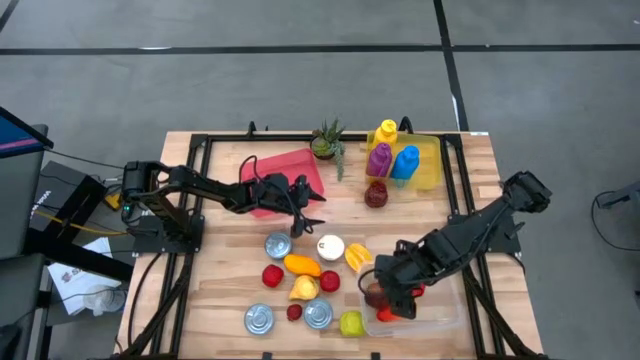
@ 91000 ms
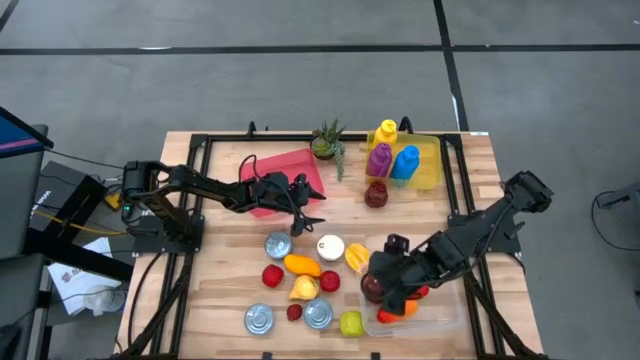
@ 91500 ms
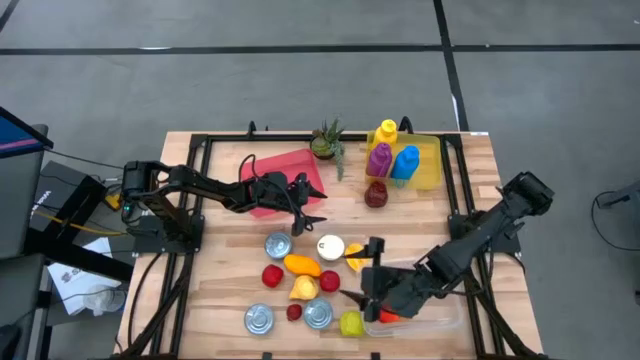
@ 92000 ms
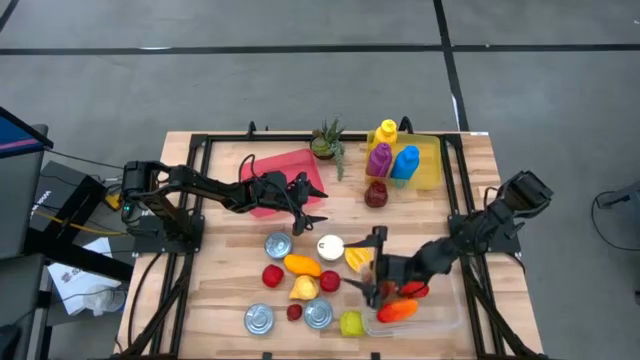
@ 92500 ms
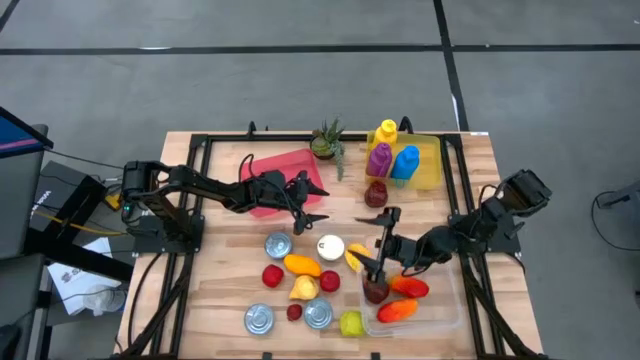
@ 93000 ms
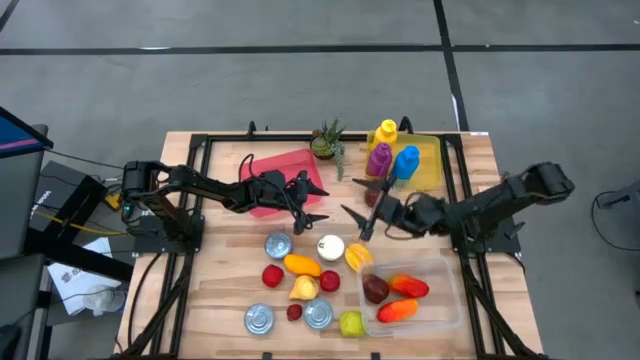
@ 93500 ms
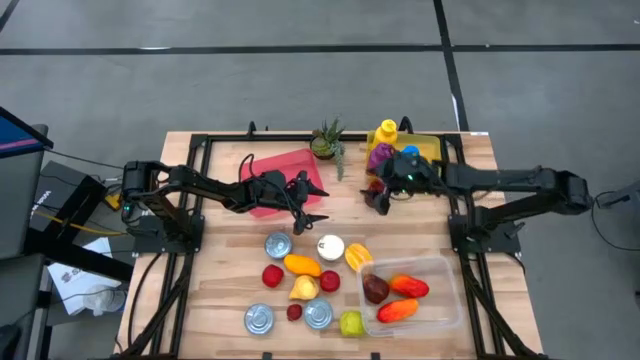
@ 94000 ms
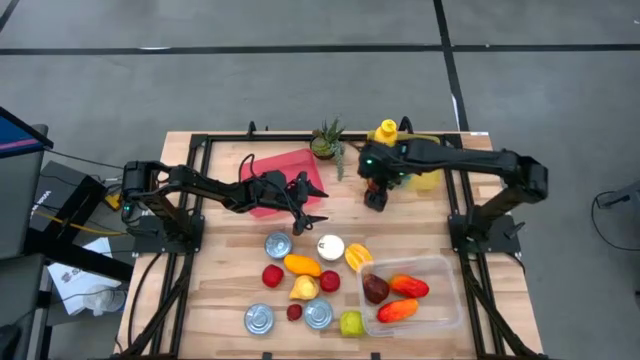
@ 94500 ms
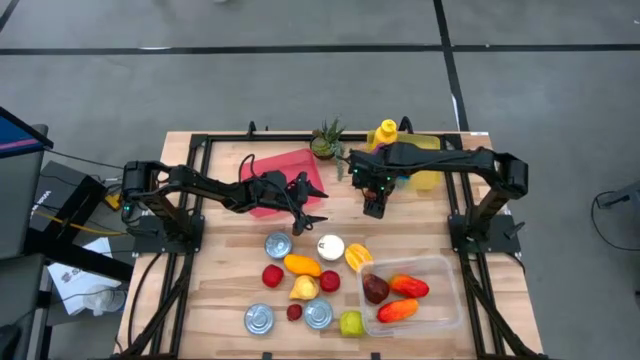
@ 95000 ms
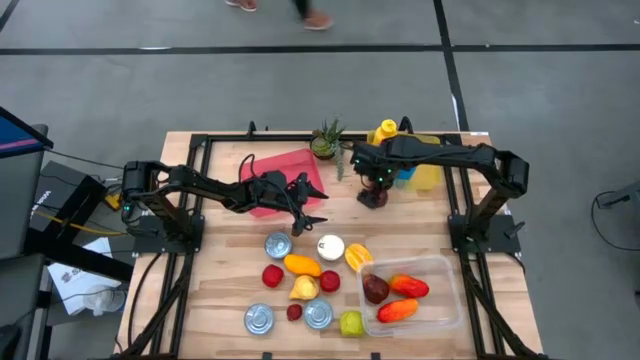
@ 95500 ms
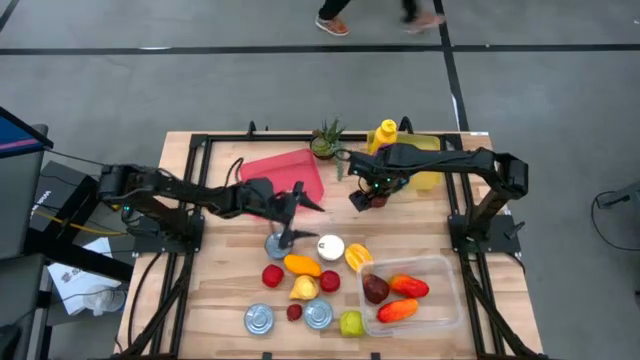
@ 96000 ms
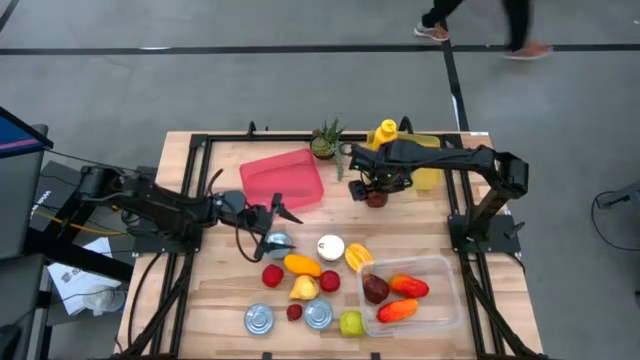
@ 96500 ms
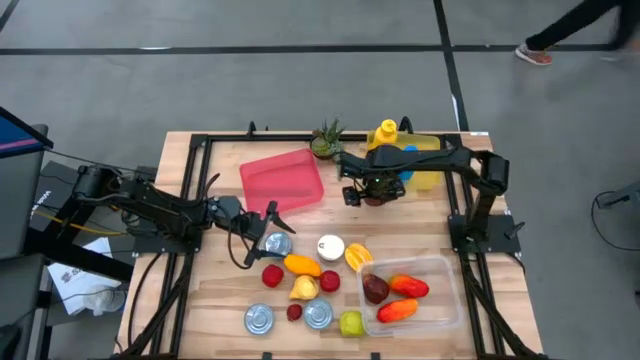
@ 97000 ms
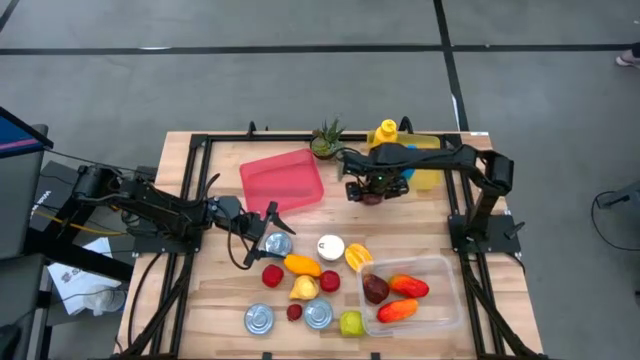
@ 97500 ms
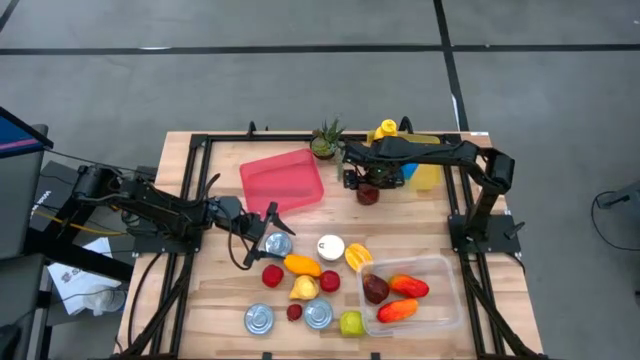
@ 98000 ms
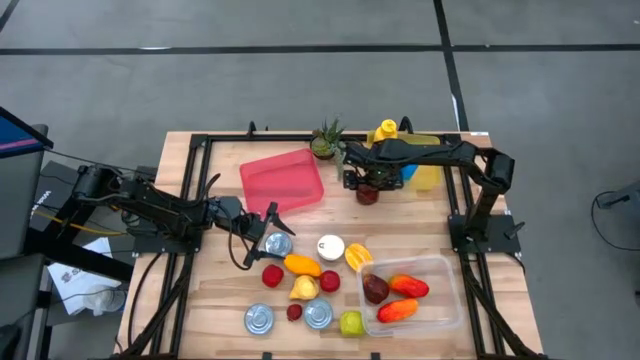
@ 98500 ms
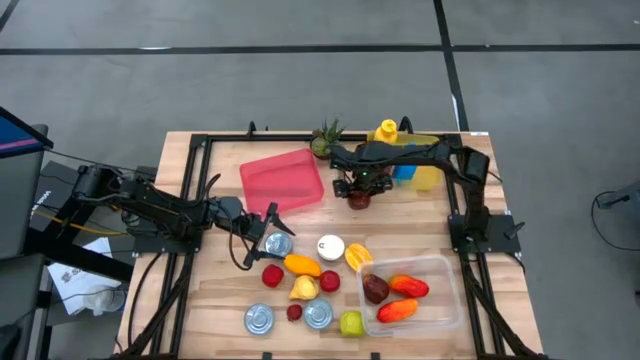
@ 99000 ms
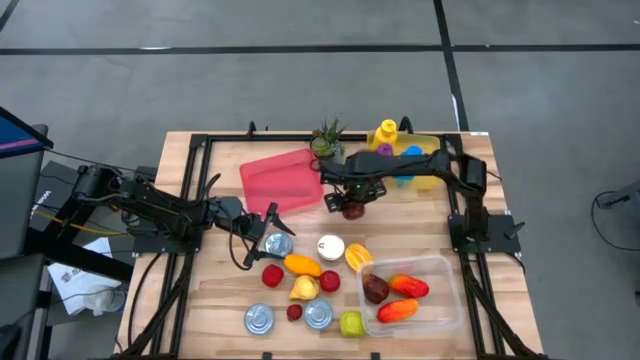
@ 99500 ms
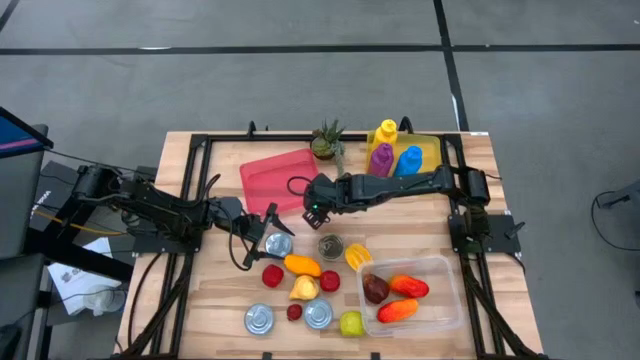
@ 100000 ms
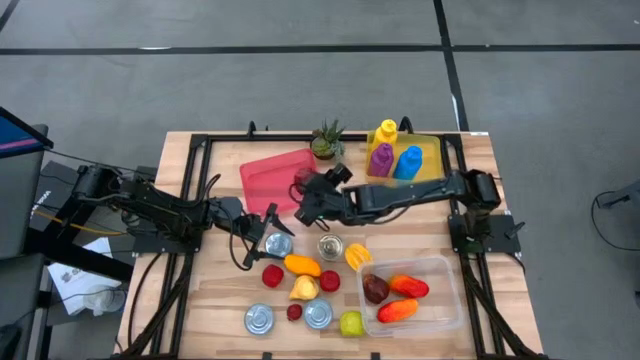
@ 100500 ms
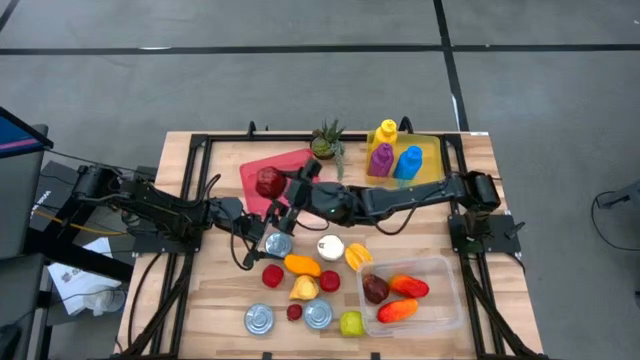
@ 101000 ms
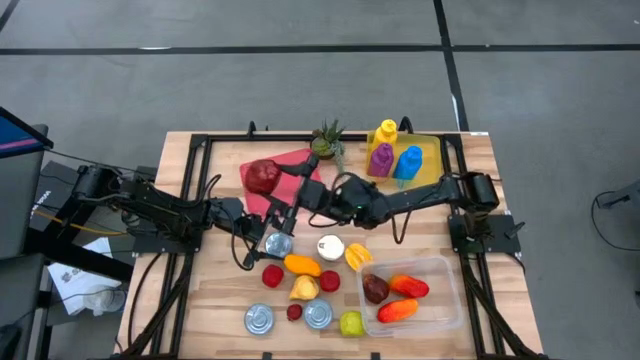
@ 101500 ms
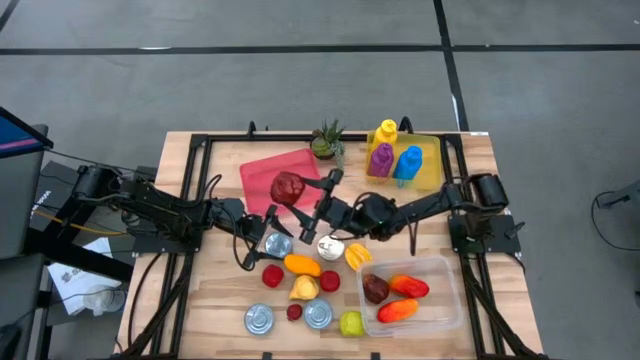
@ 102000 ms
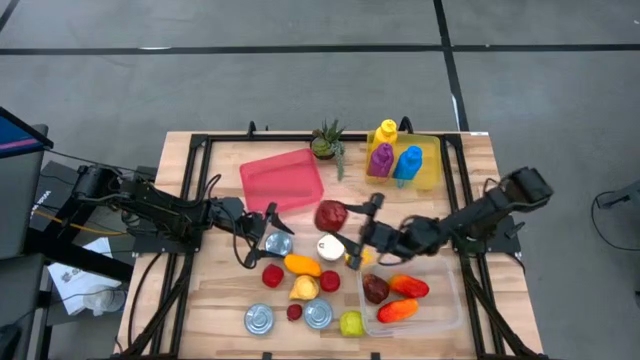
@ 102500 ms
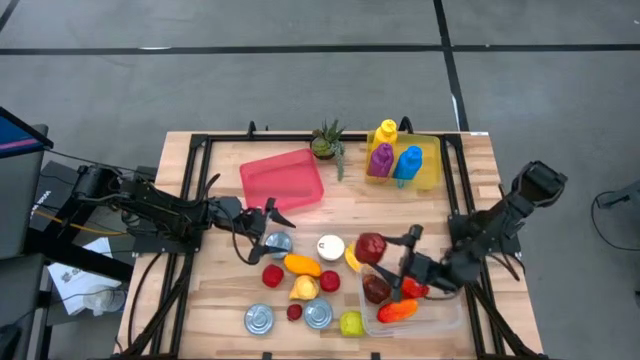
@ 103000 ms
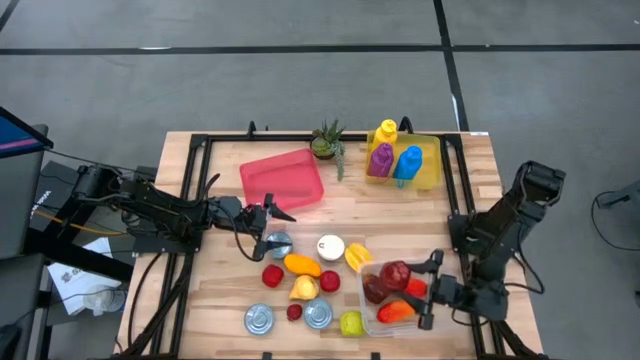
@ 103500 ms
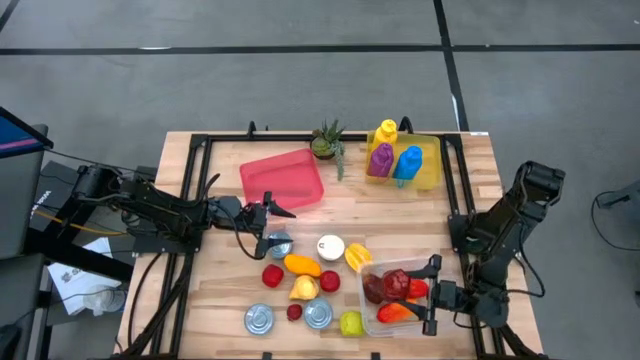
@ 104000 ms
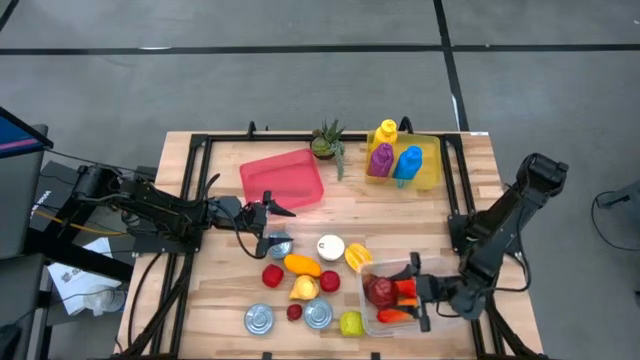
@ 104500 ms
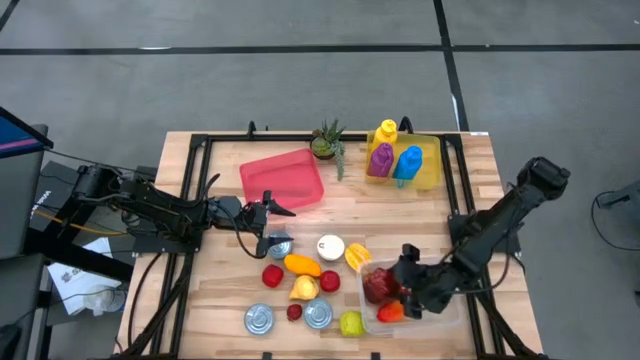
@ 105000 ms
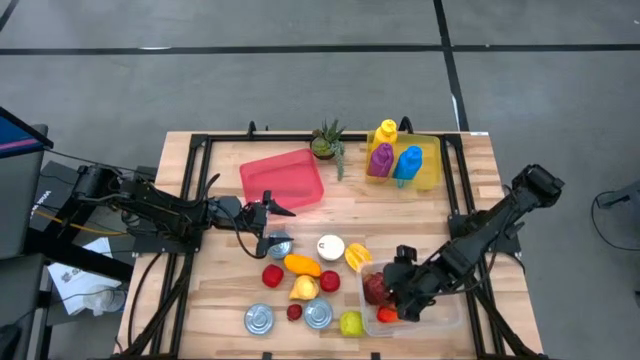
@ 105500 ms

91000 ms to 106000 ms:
Task: Pick & Place Food Item
Put the red apple into the transparent bin
